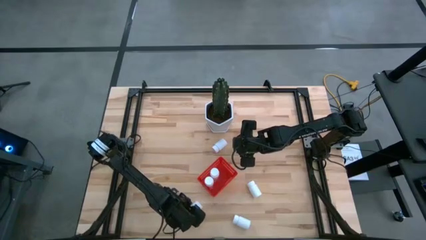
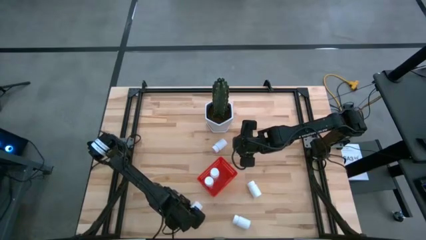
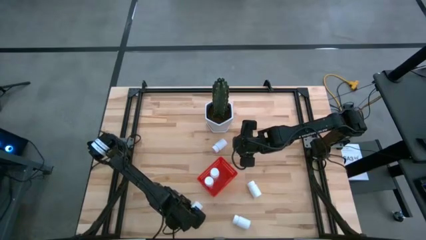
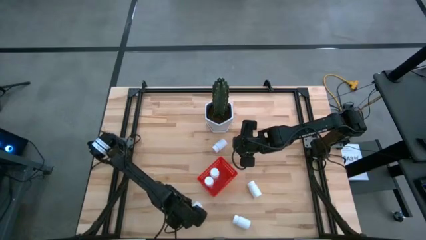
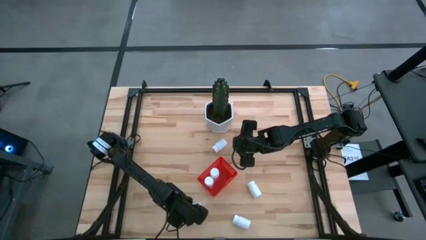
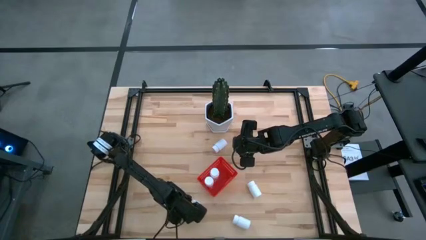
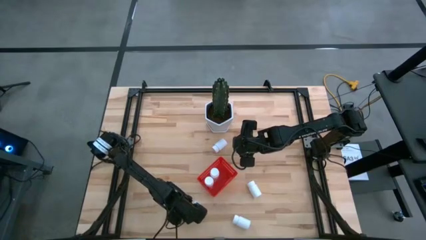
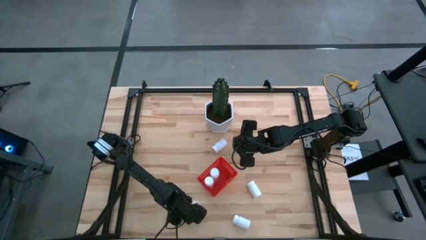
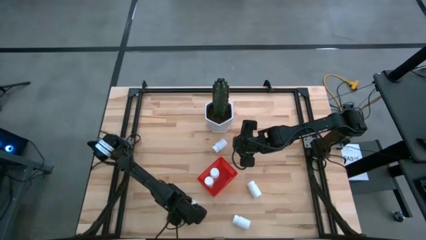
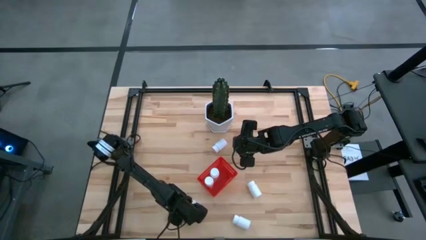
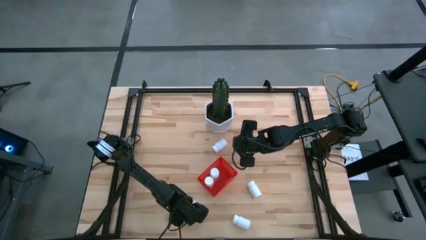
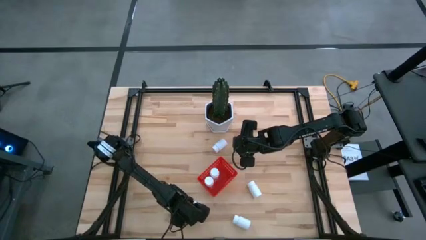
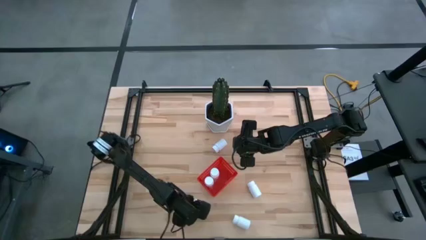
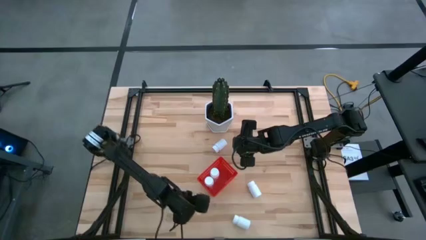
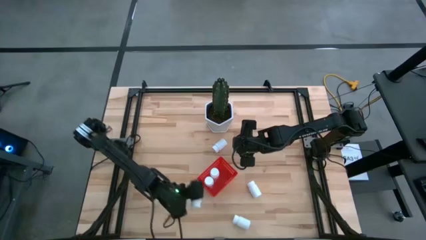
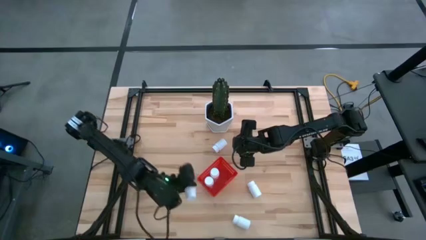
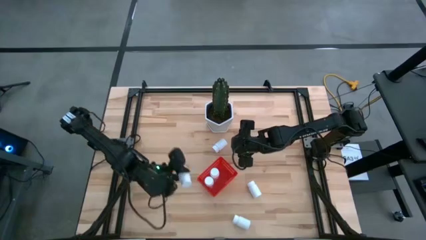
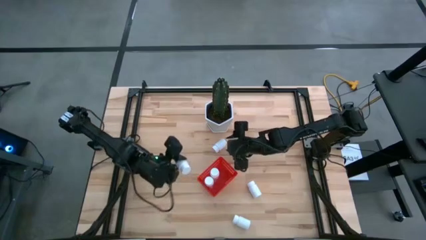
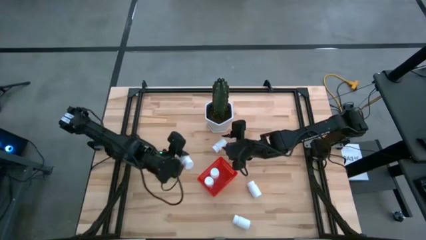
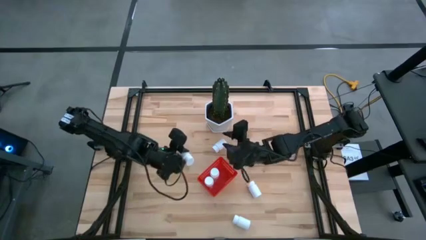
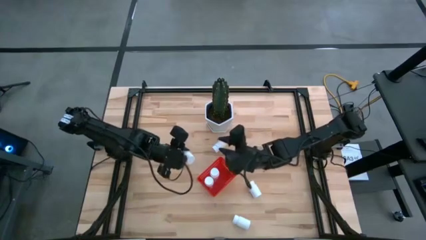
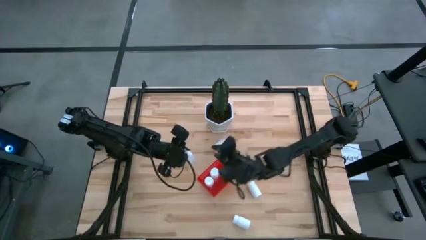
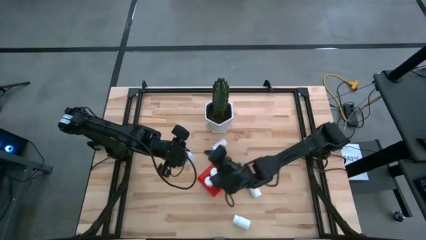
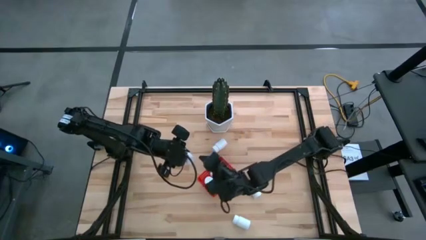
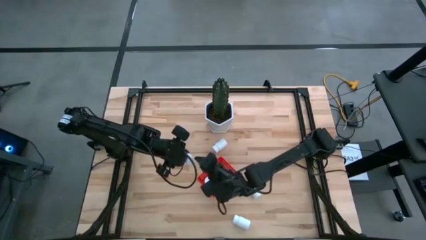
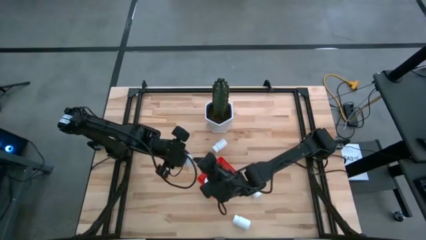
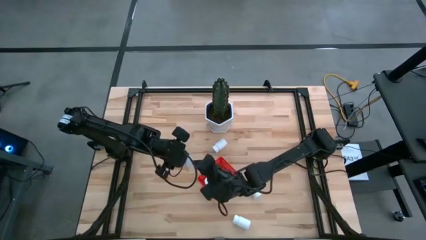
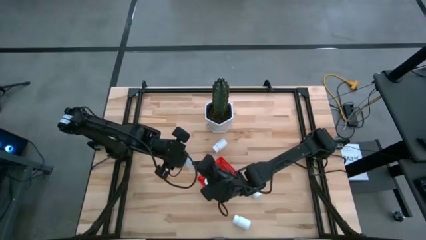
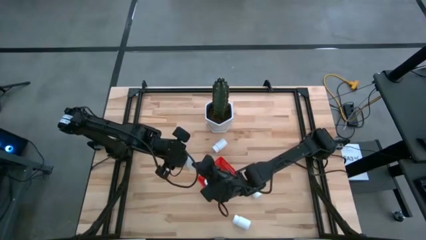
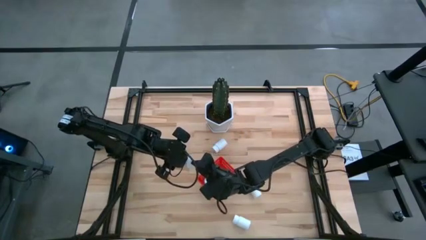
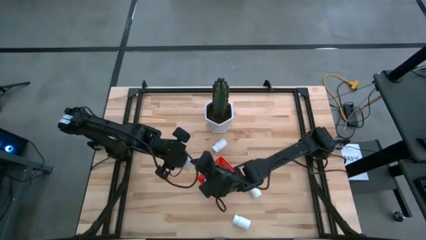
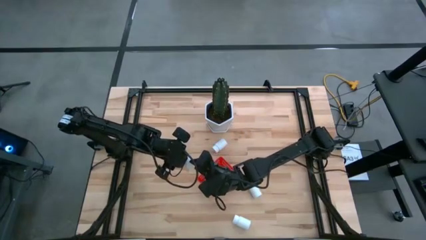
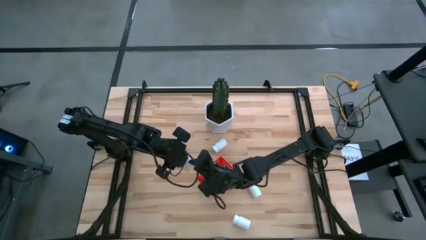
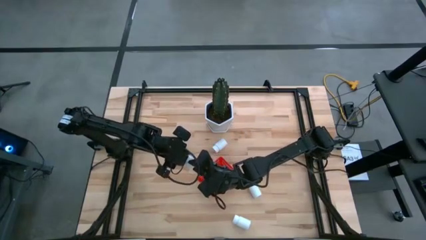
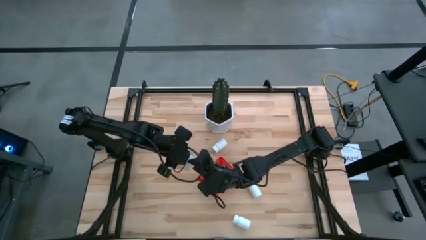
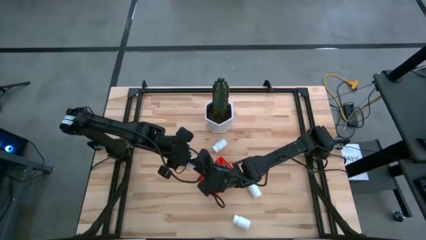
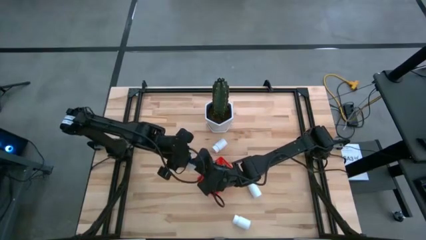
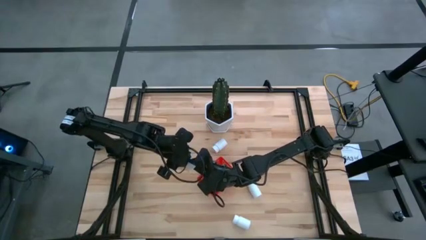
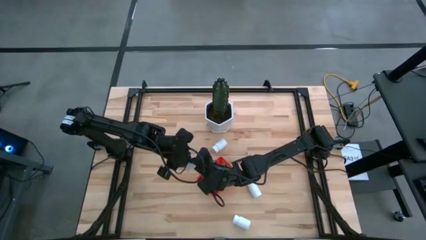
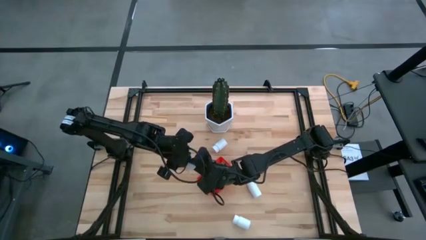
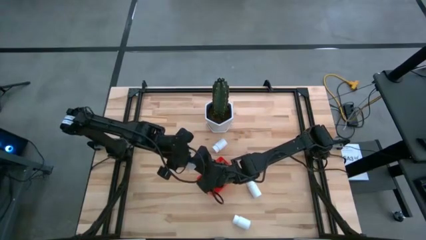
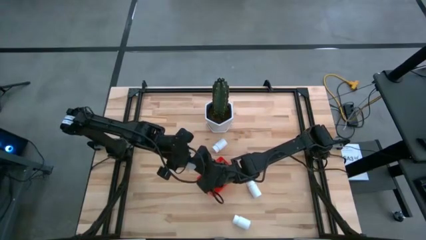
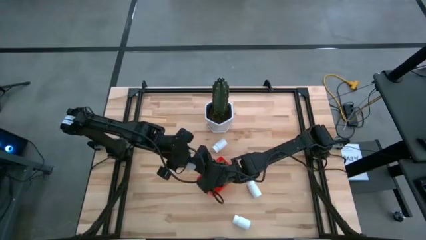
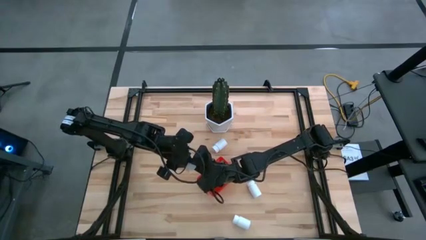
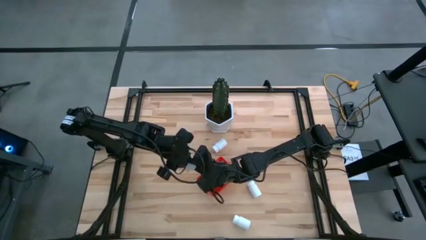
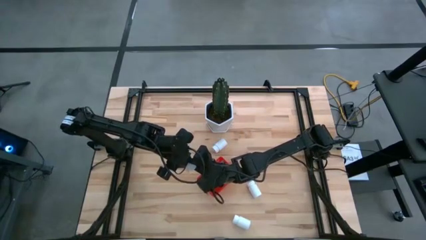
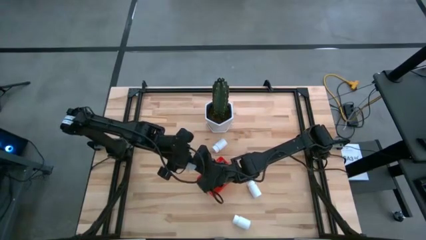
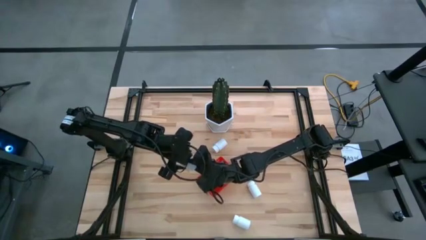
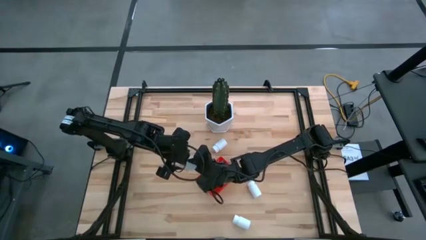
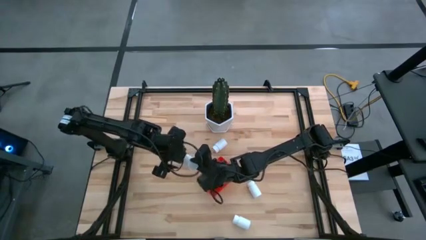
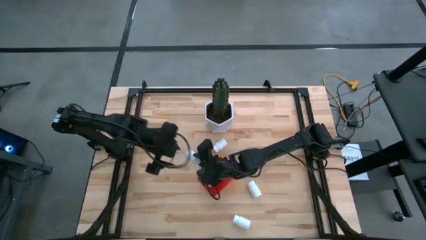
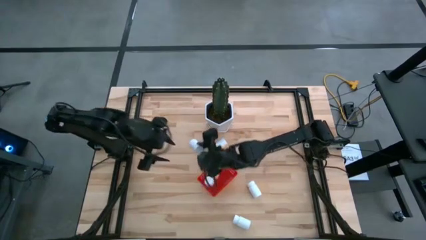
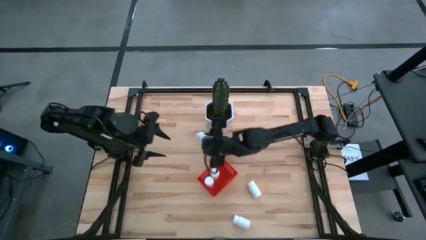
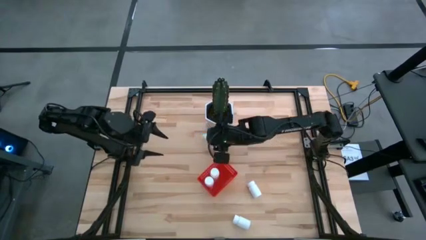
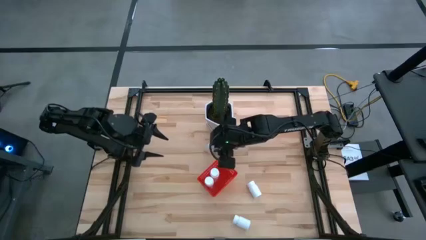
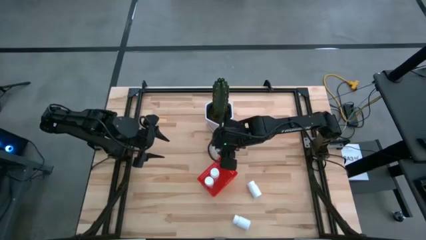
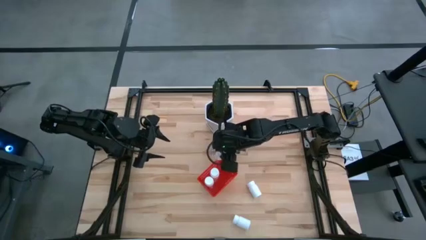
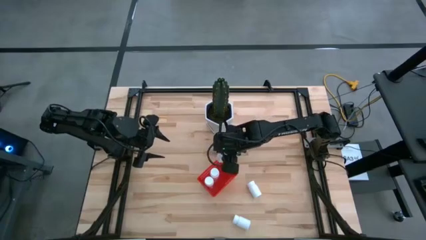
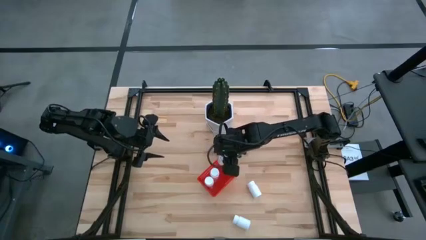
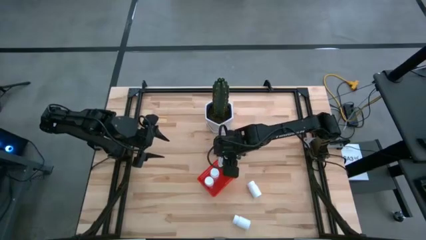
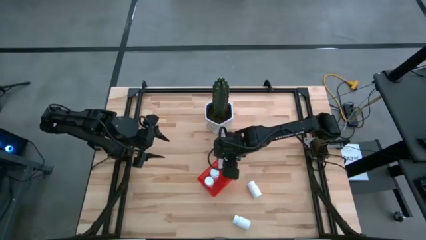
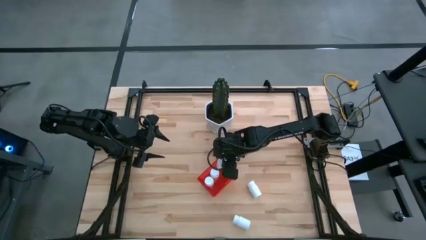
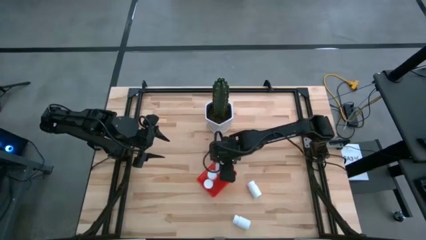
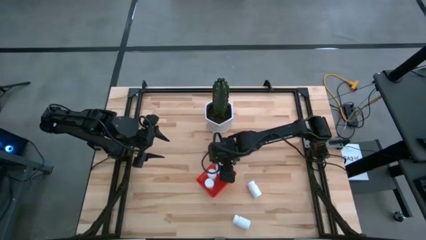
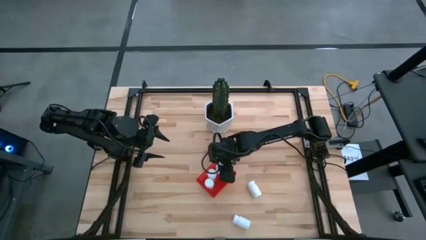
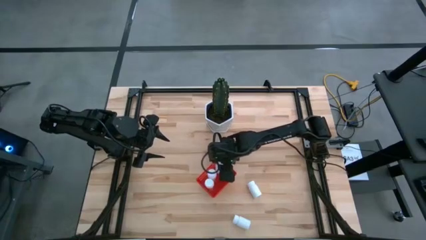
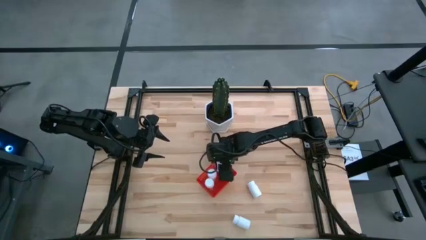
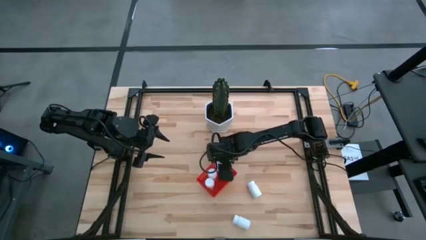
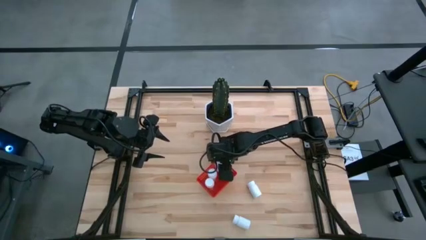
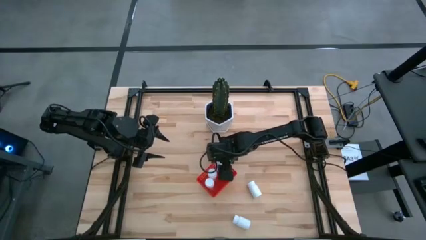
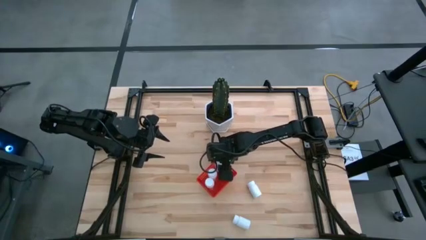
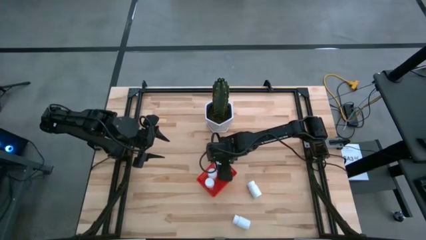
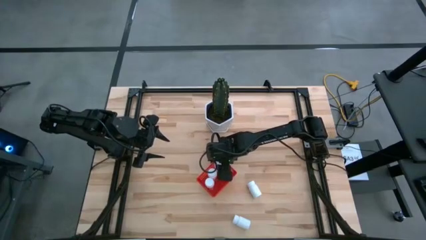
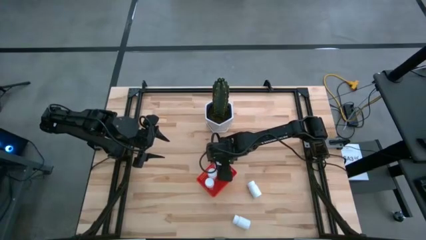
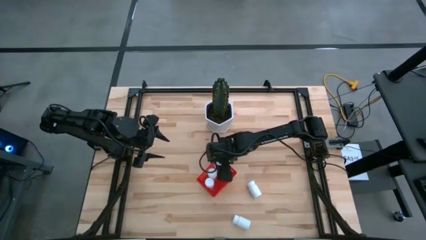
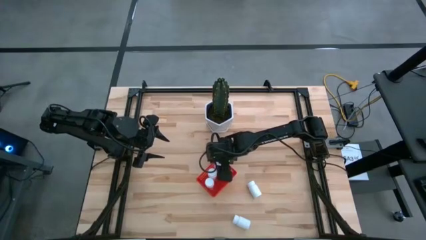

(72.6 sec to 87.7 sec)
Task: Pick and place pill bottles into a basket
Put the white pill bottle into the red bin
